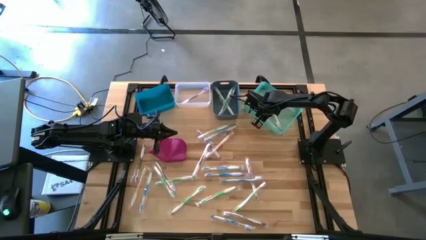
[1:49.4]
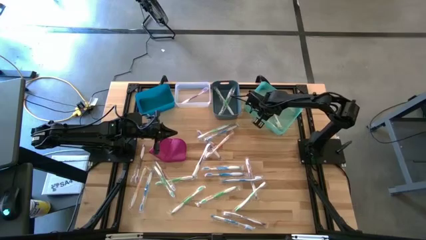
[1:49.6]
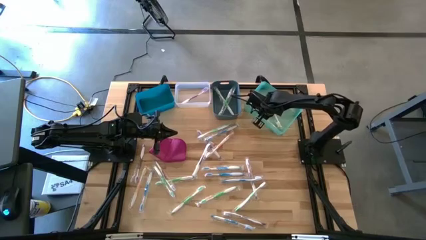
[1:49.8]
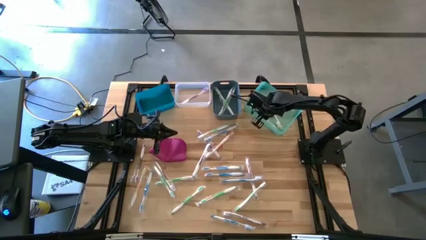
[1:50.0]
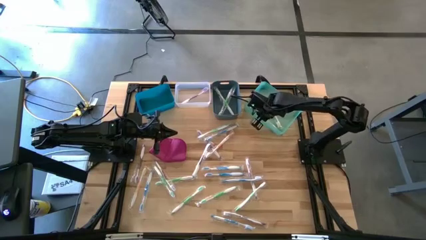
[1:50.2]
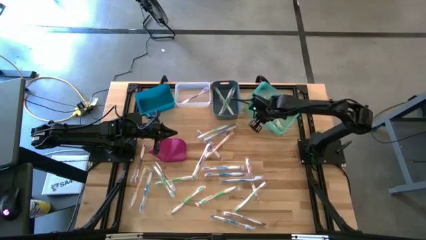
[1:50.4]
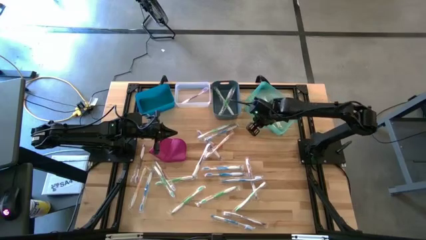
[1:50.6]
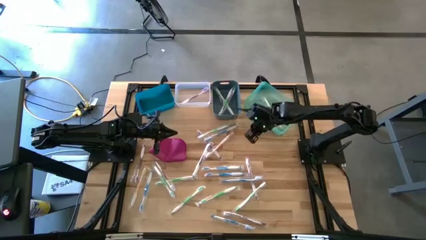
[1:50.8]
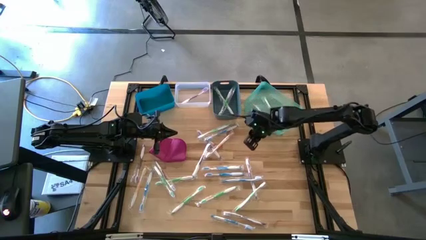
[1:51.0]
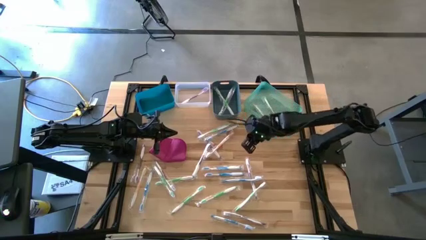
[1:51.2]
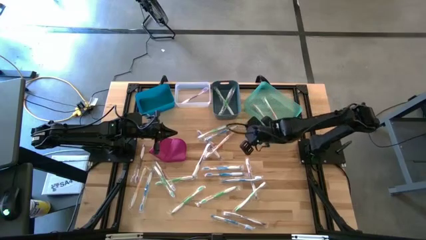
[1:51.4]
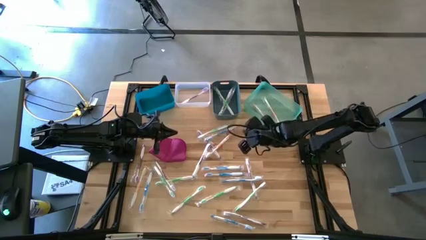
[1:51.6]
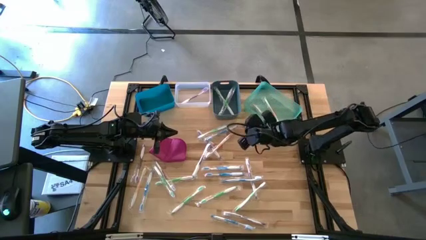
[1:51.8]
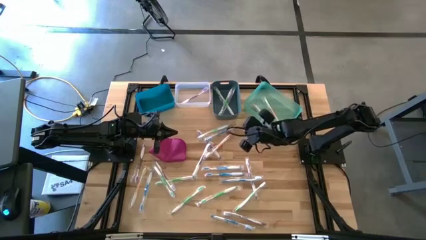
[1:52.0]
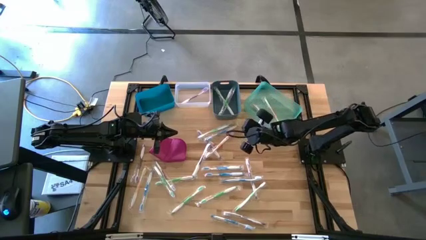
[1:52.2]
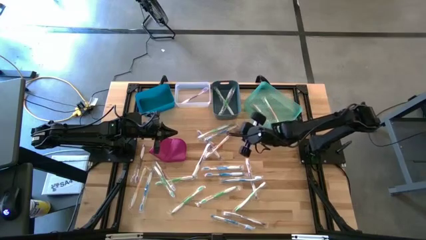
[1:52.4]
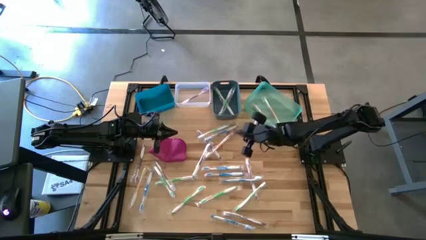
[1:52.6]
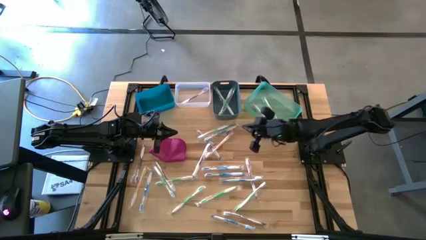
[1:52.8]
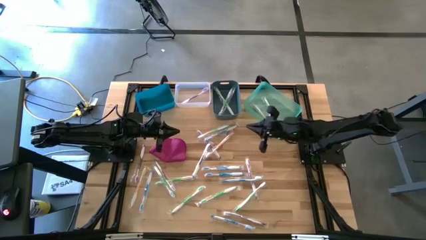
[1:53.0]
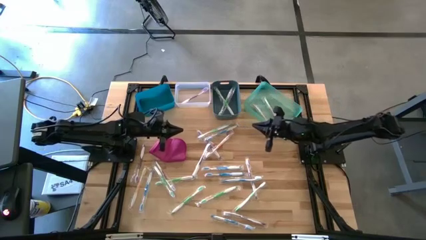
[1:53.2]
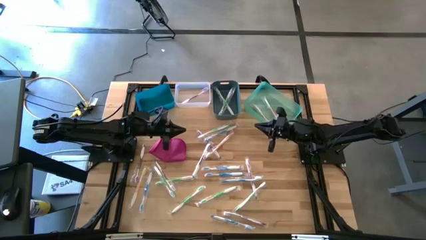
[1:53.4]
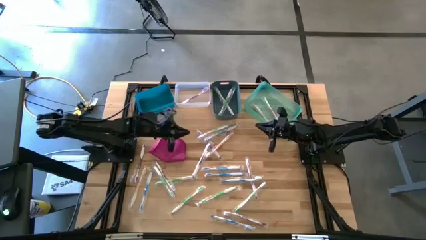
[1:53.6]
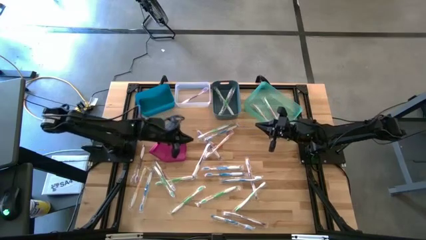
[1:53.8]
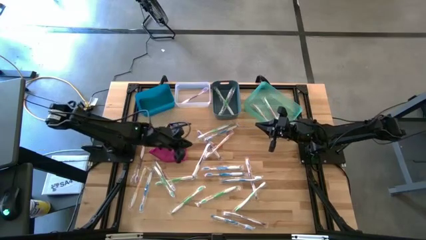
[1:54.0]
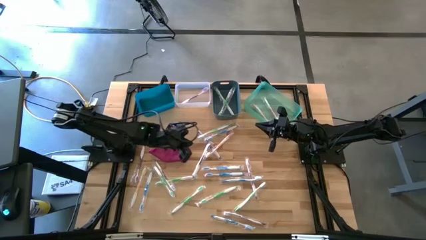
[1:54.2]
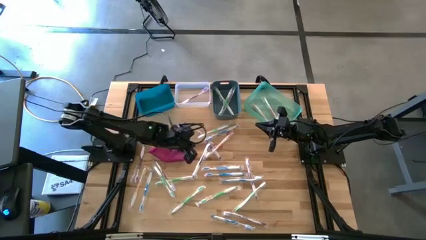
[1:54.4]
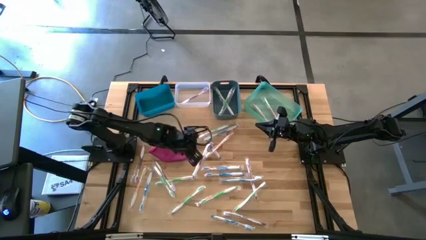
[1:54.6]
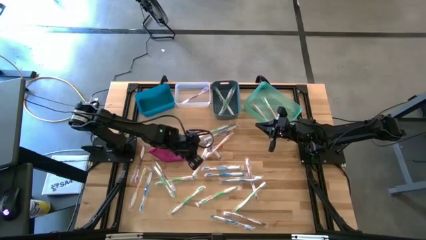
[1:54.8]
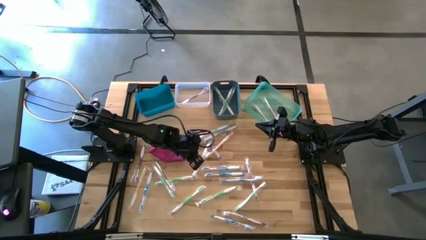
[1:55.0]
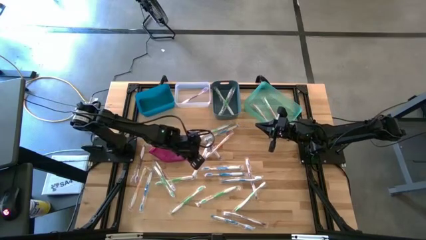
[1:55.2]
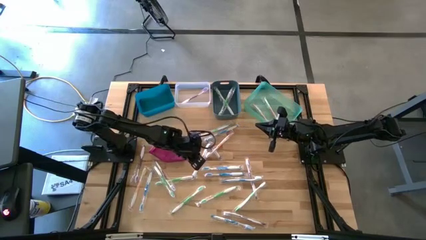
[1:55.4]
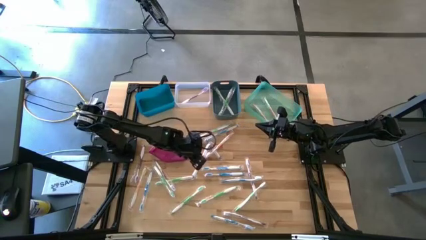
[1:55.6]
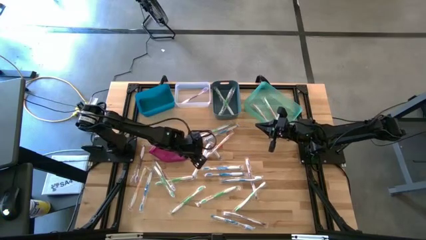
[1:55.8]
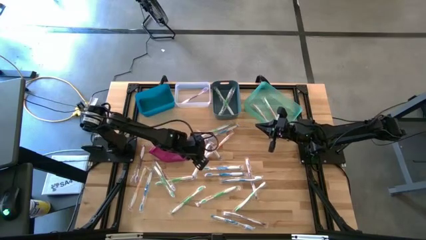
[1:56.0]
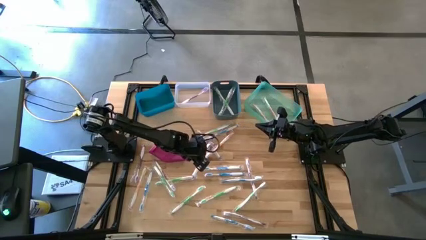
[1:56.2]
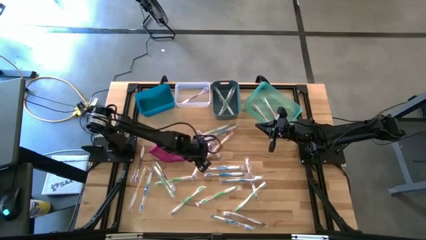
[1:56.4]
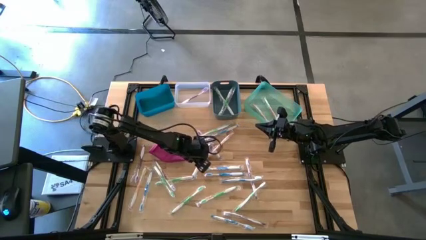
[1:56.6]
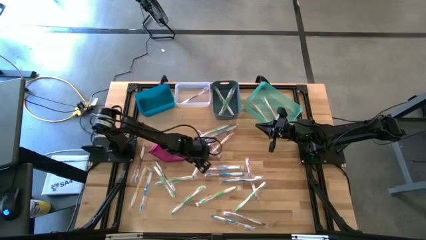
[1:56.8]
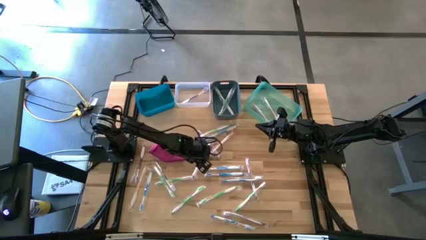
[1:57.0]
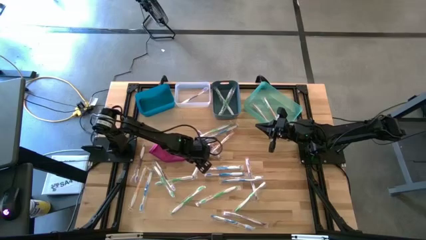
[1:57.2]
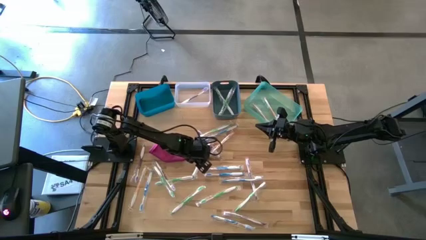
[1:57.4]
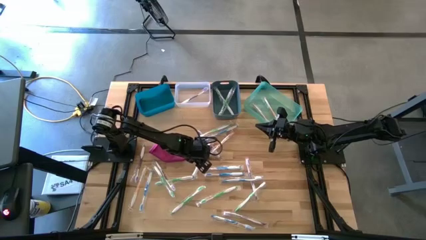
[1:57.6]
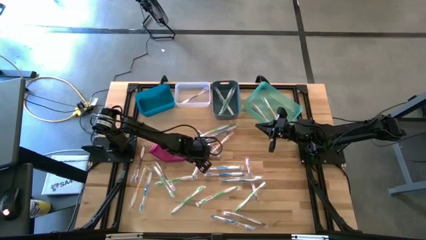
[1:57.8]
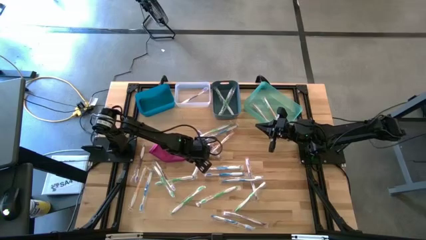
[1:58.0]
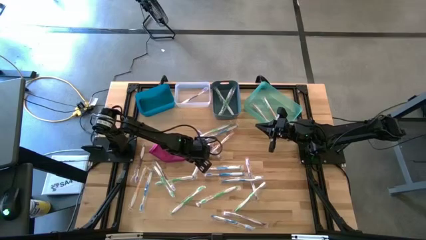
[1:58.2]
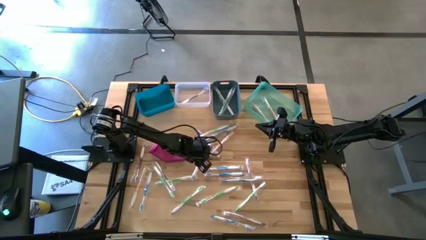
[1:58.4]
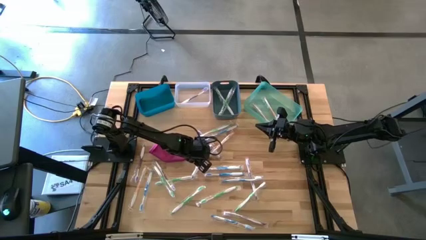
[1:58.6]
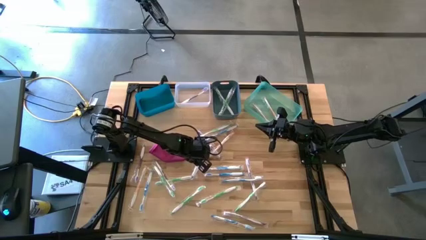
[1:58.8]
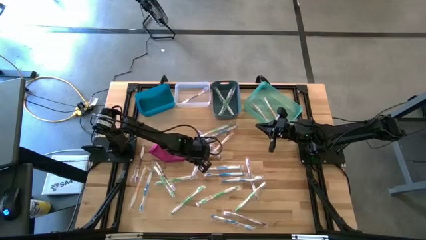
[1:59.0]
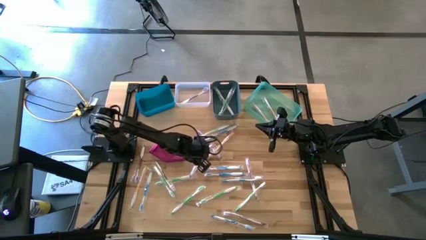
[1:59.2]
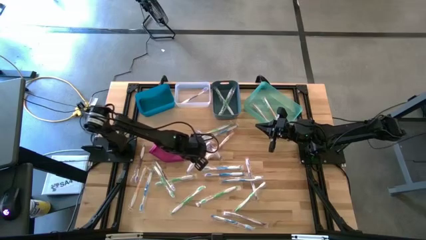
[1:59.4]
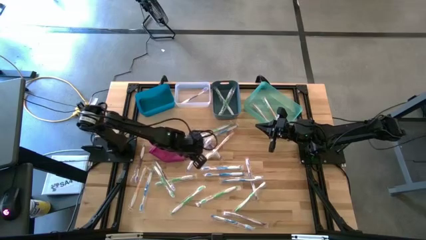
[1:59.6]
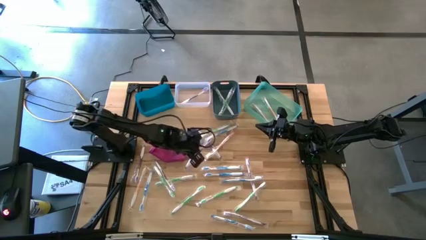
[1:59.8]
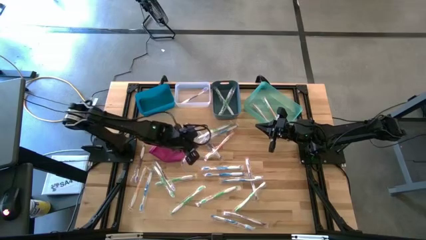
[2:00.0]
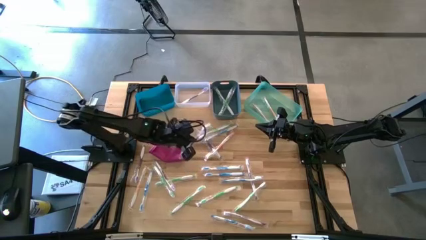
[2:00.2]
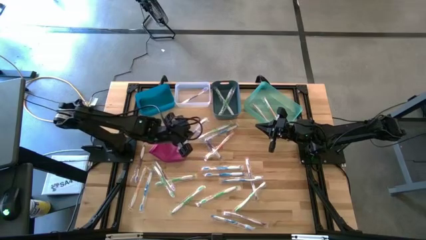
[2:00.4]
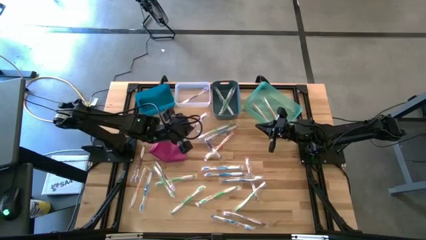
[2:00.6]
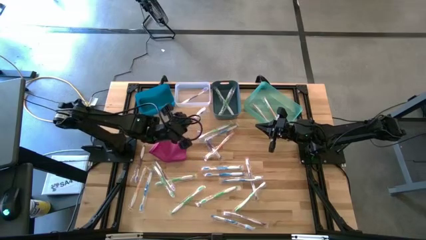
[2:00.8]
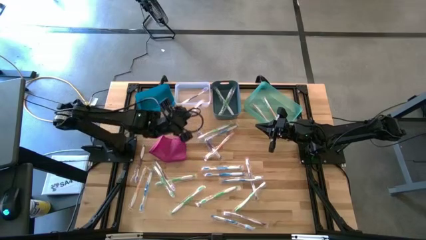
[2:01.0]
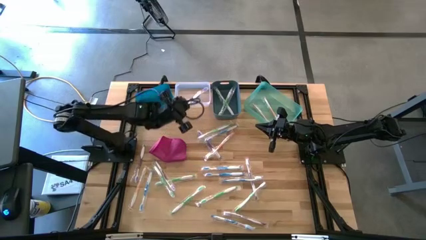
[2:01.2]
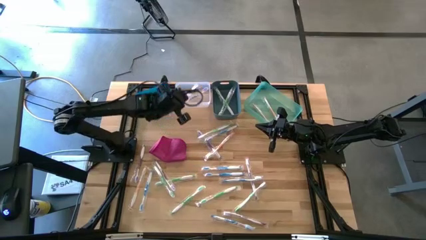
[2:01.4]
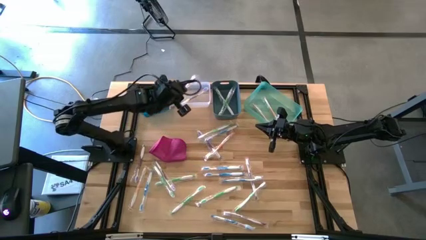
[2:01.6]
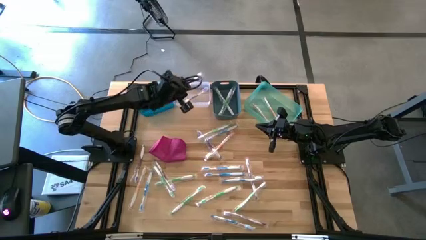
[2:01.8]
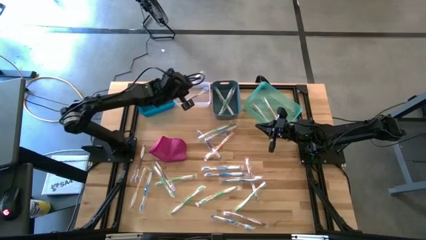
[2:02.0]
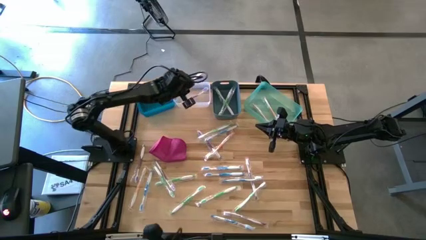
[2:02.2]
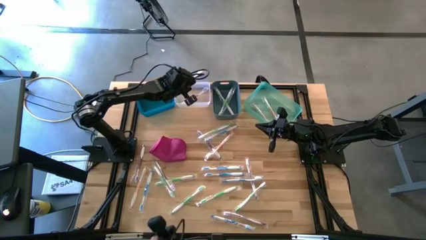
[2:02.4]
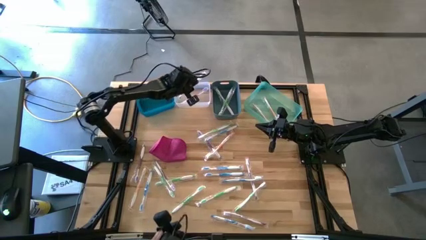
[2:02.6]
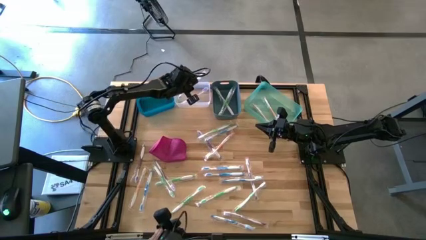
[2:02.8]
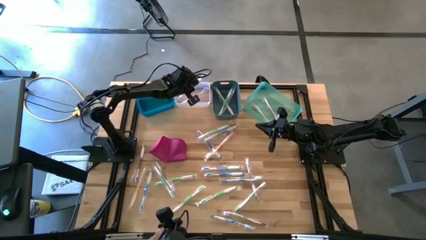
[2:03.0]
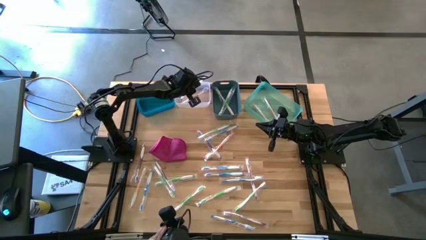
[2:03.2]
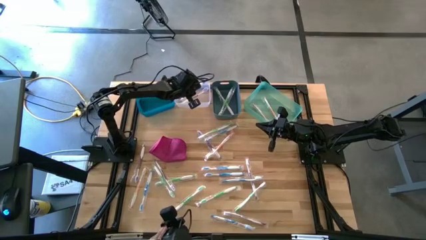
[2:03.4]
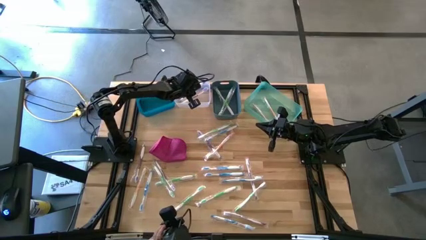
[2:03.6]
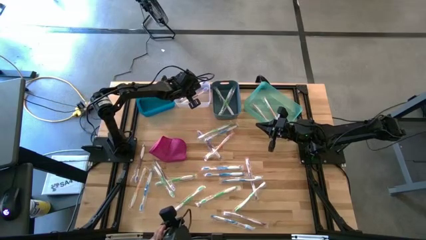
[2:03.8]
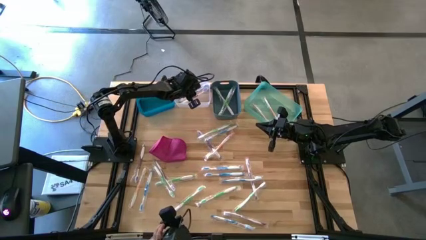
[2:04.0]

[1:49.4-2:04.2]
Task: Pick & Place Toothbrushes
Put the violet toothbrush into the white bin

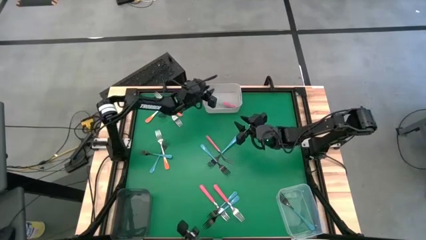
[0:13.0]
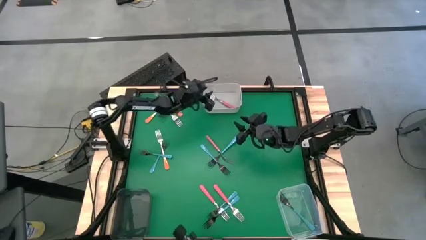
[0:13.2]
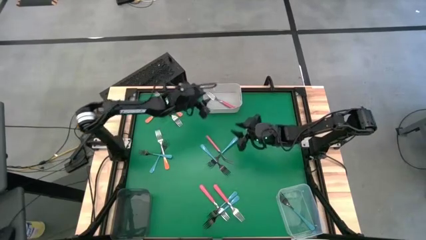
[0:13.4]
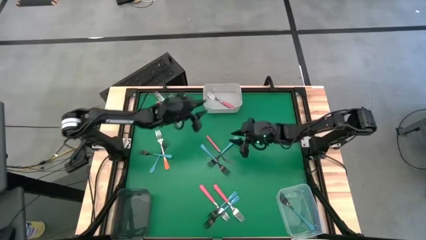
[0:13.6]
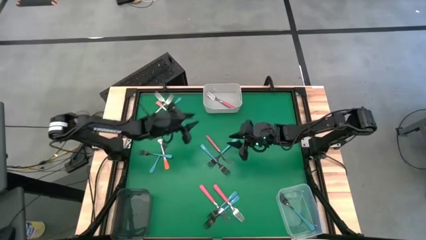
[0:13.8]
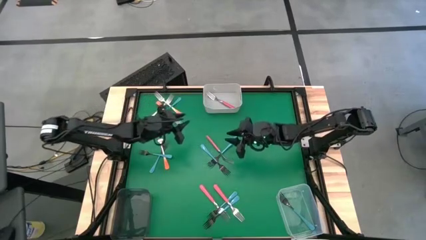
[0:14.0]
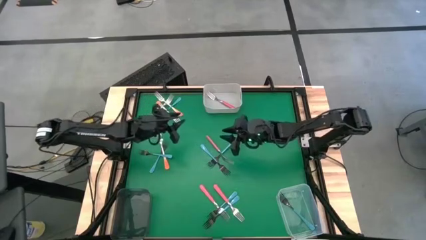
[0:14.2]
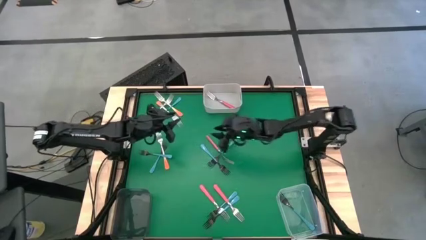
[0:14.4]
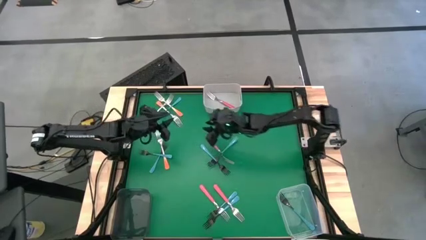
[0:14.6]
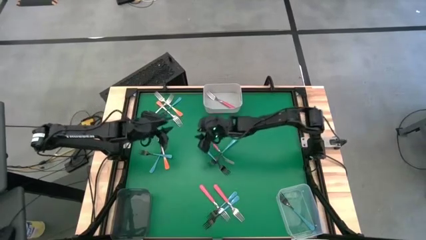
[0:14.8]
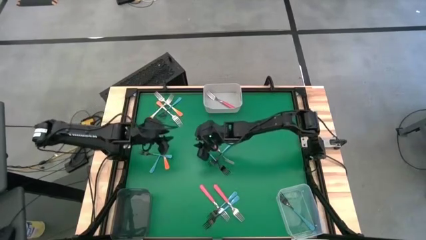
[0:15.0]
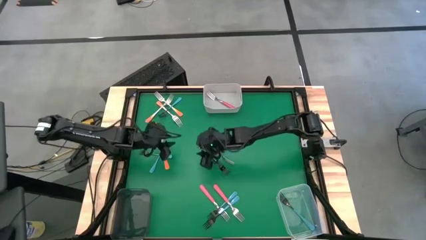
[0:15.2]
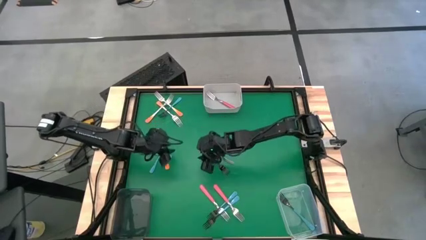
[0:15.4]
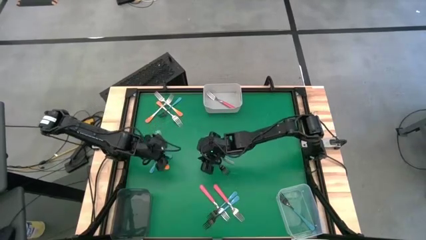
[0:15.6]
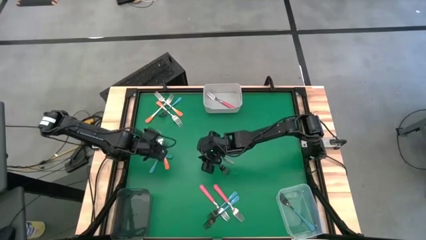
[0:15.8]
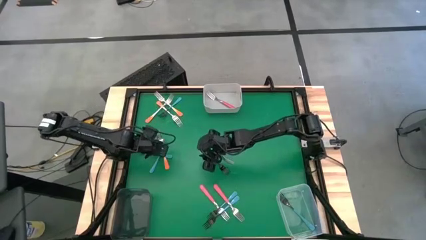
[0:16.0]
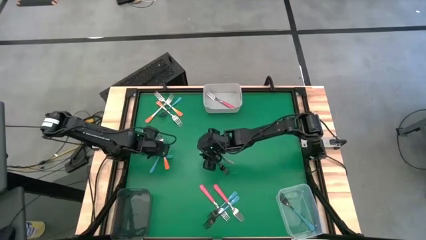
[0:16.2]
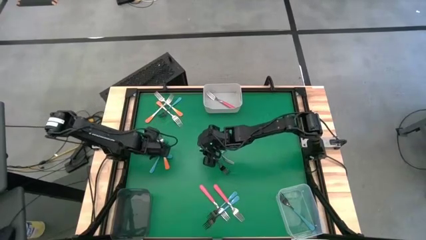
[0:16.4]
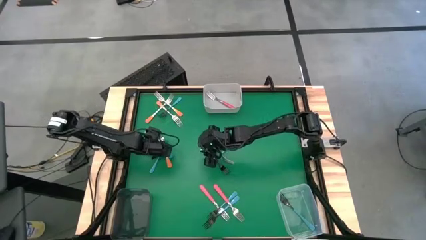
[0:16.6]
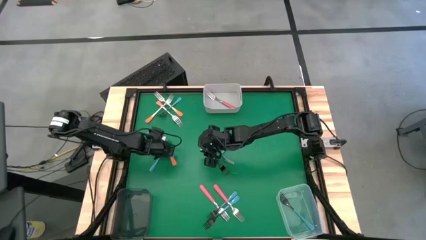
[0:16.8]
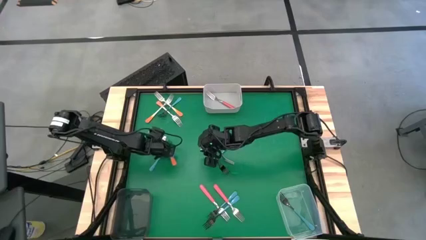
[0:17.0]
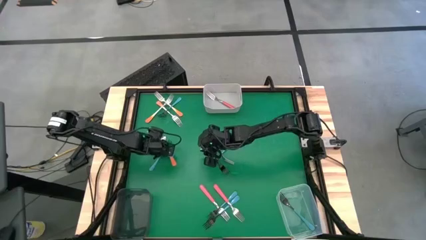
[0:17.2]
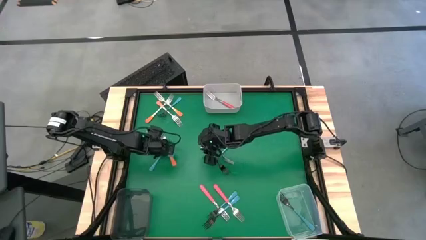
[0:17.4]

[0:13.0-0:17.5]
Task: Sort silverware by color (type)
Put the orange fork into the black bin
